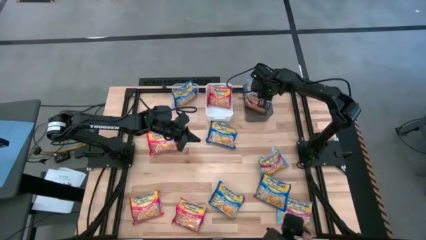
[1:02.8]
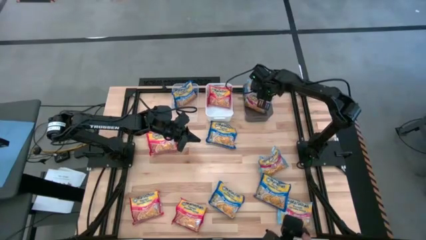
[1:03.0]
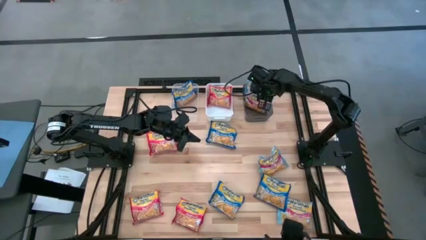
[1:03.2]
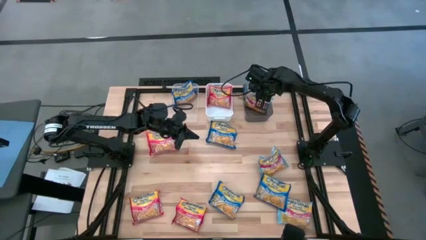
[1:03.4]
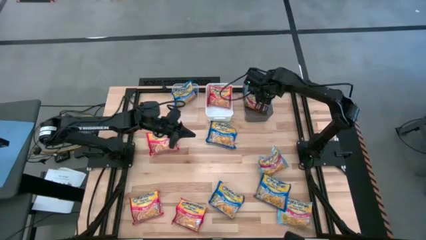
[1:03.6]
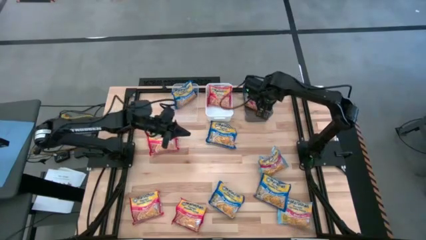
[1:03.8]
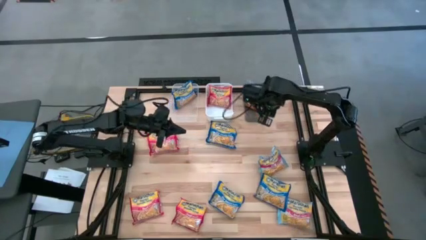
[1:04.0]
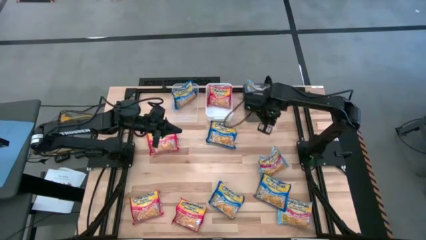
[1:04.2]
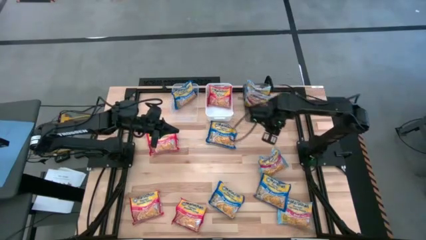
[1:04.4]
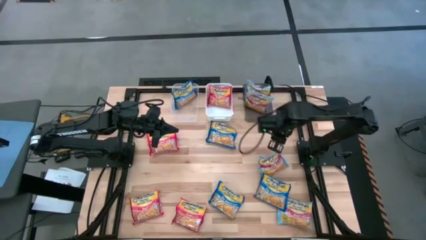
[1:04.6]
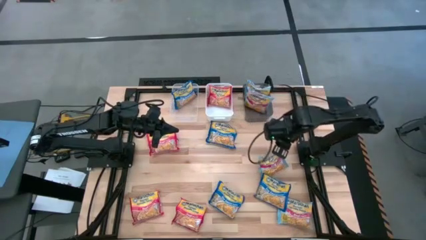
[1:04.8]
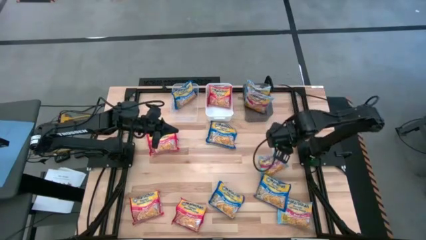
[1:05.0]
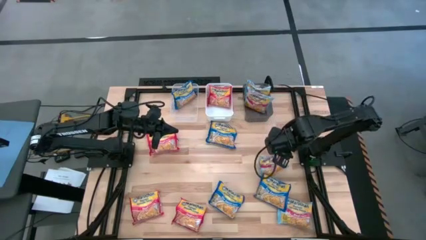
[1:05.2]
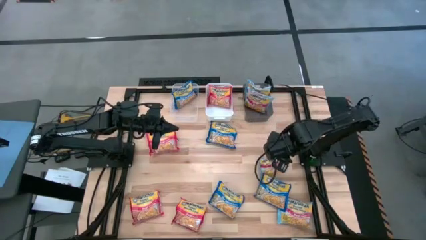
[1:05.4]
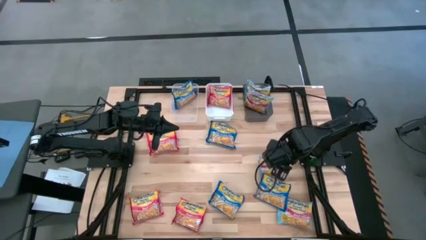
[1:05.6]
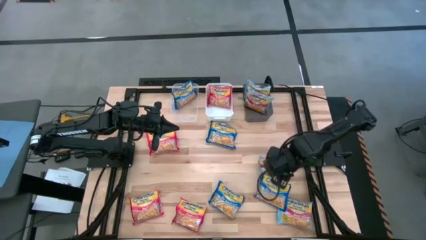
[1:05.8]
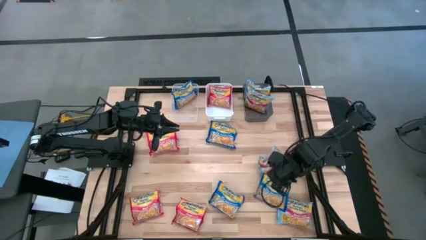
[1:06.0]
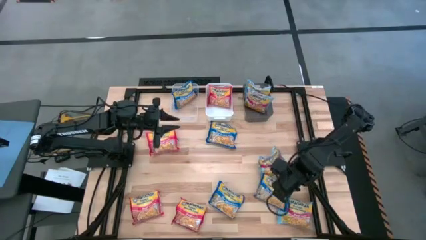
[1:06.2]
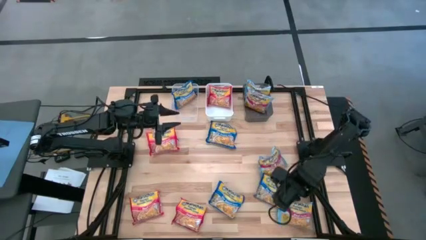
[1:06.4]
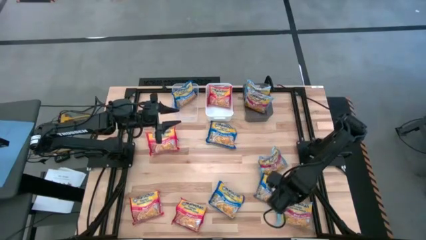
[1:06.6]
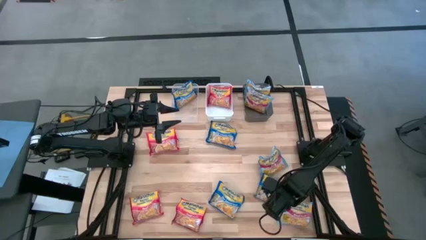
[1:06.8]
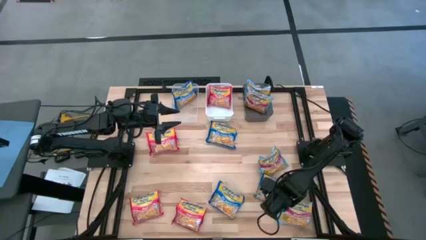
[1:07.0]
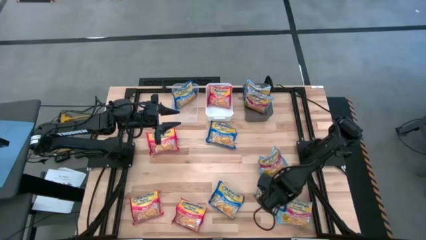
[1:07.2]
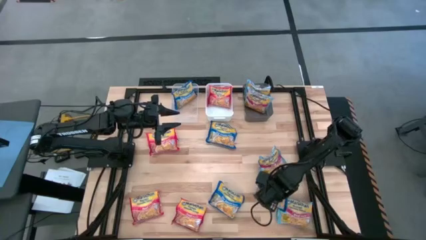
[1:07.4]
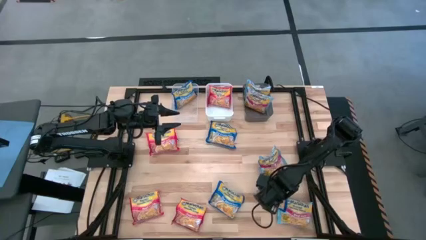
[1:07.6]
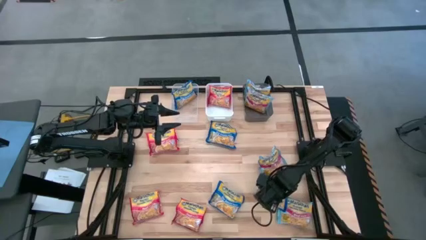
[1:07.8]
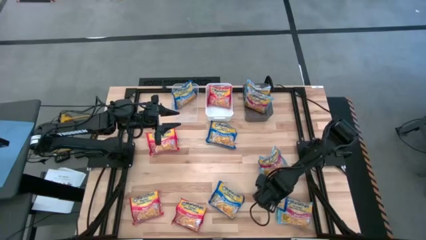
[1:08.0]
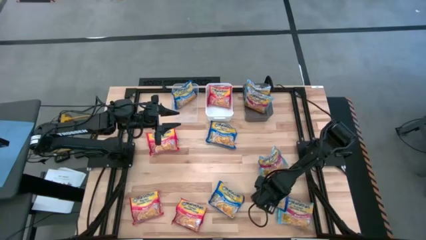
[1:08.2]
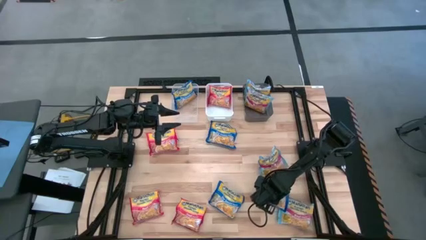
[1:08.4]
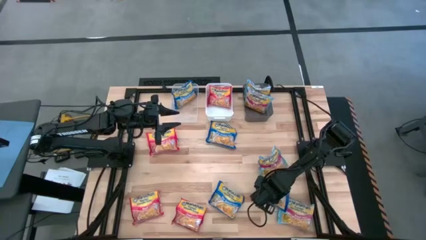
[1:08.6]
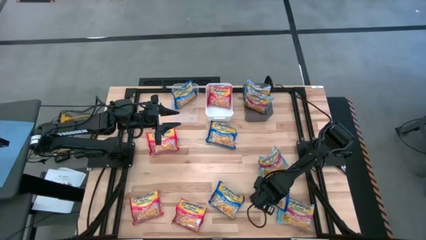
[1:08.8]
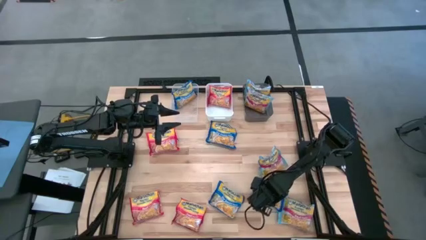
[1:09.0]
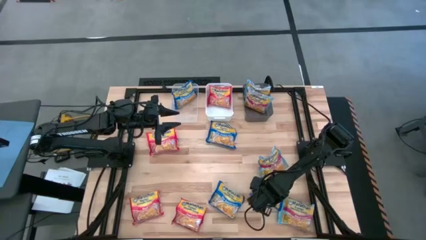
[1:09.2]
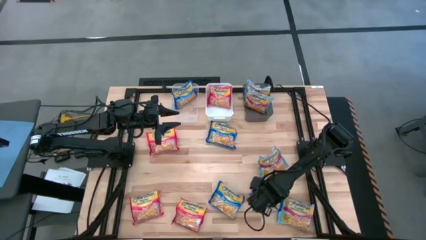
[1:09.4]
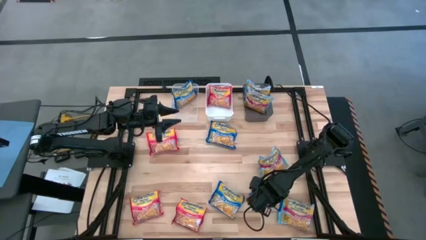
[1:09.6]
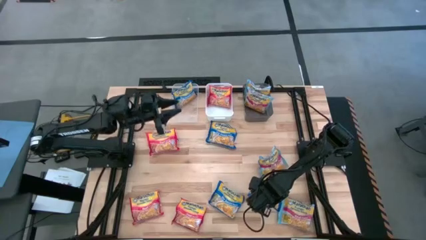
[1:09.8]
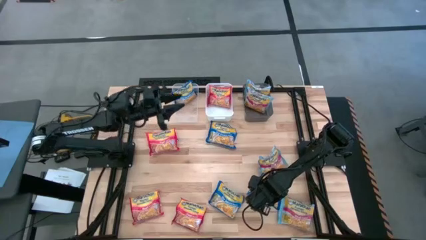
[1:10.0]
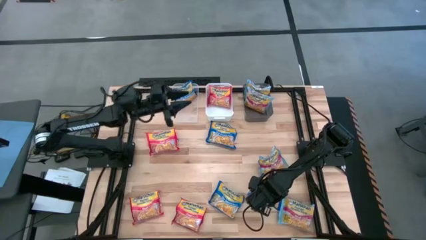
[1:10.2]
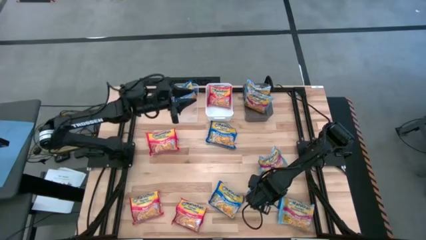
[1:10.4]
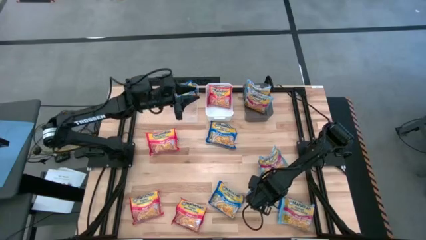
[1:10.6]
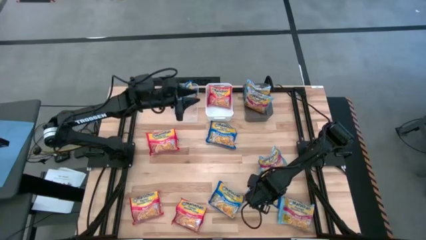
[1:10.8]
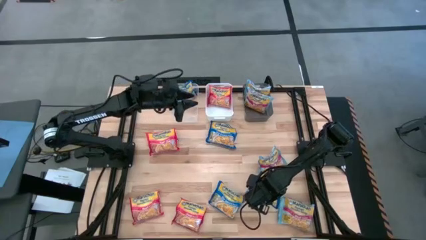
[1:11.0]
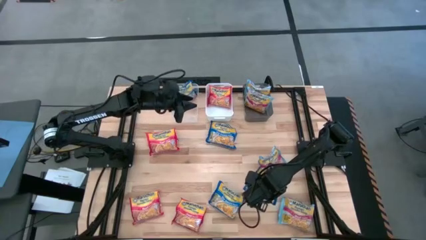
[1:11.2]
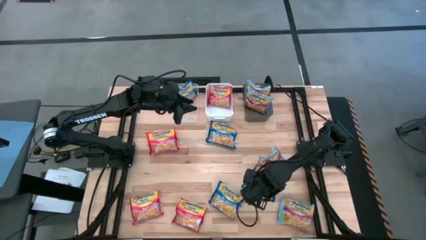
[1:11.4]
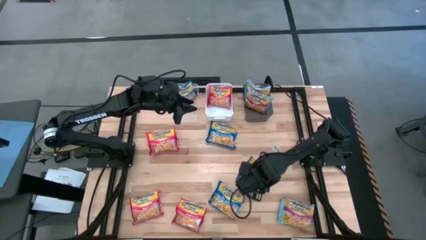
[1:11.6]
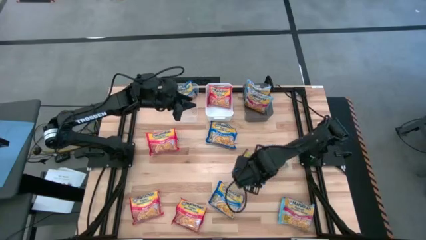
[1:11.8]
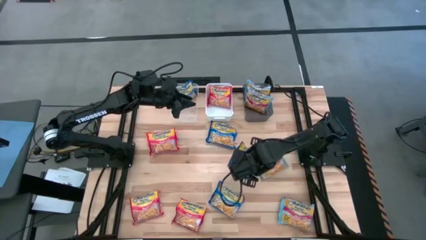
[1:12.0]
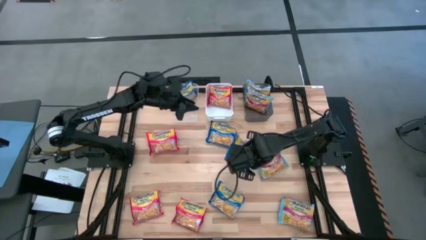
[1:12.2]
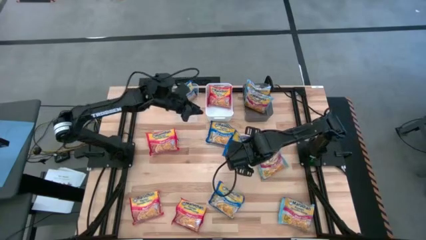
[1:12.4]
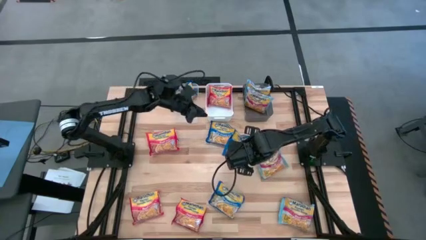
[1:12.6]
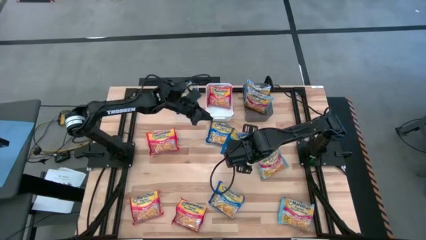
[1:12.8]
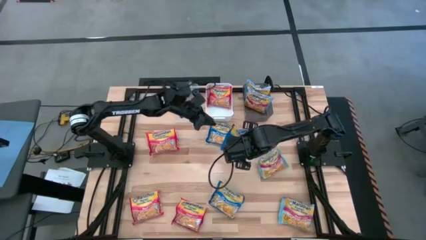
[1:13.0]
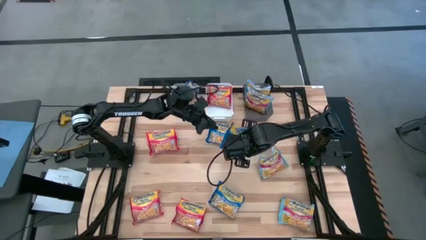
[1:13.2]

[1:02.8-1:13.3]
Task: Sort Maruchan noodles
Put the blue noodle pack into the transparent bin

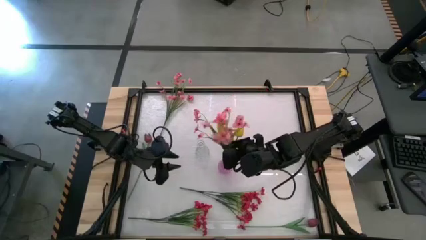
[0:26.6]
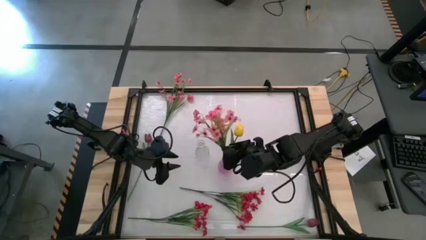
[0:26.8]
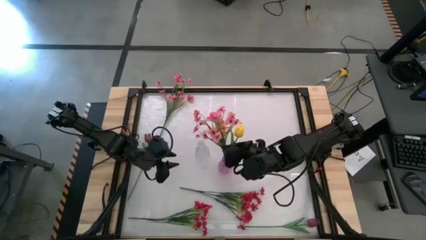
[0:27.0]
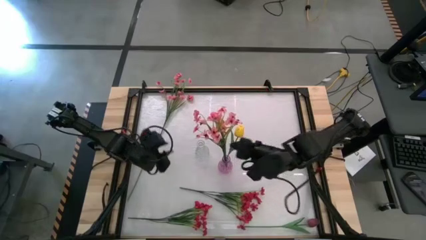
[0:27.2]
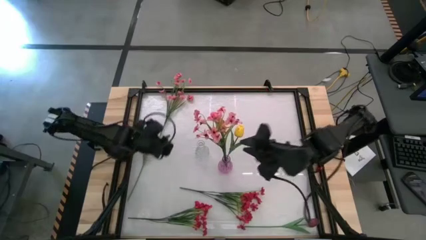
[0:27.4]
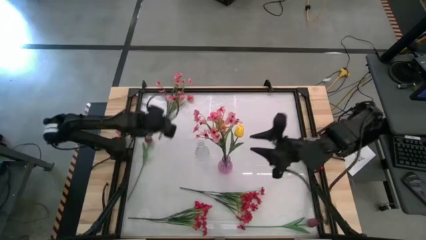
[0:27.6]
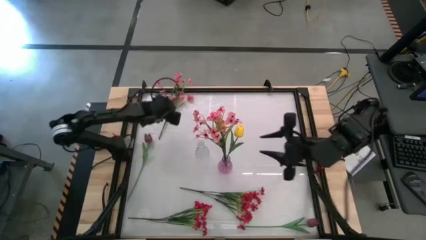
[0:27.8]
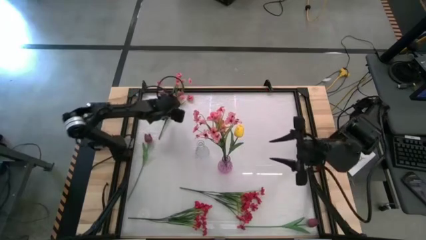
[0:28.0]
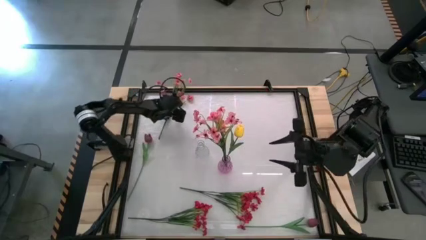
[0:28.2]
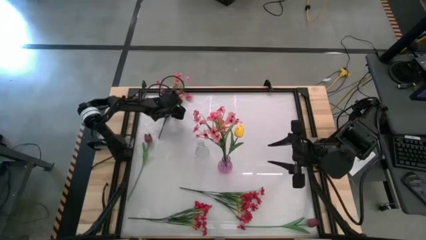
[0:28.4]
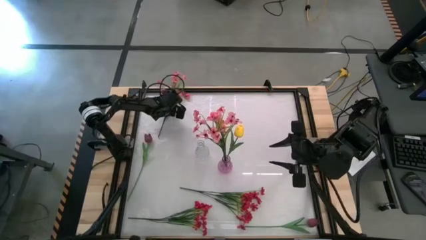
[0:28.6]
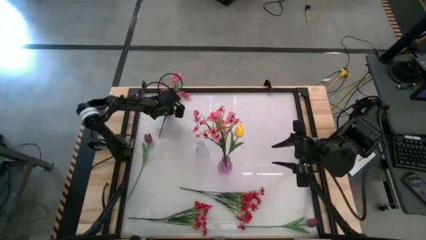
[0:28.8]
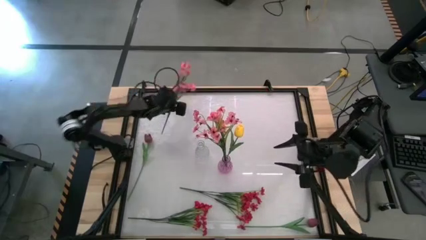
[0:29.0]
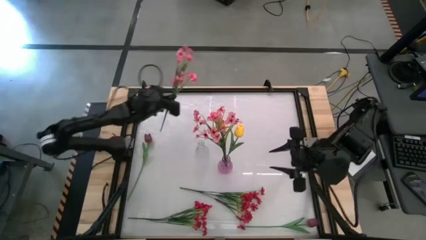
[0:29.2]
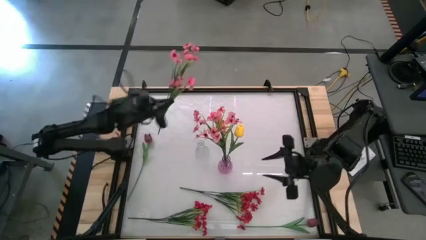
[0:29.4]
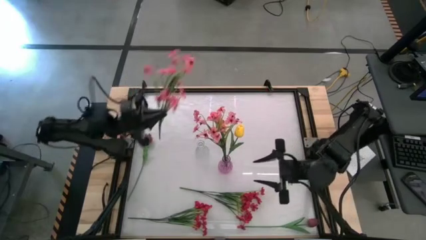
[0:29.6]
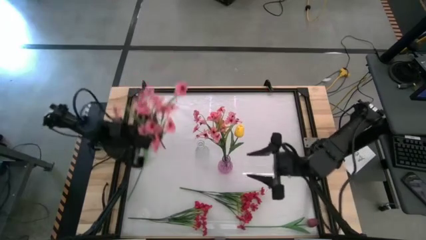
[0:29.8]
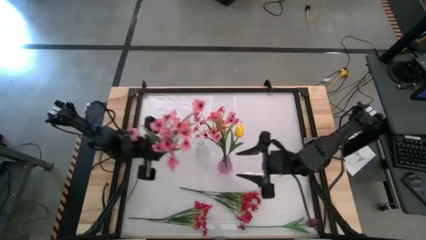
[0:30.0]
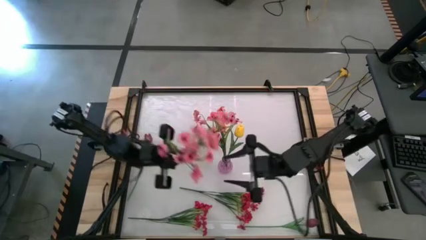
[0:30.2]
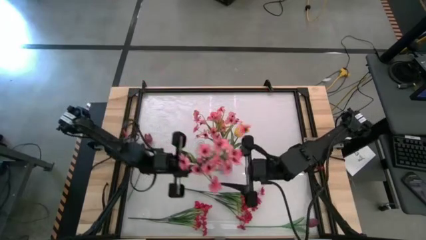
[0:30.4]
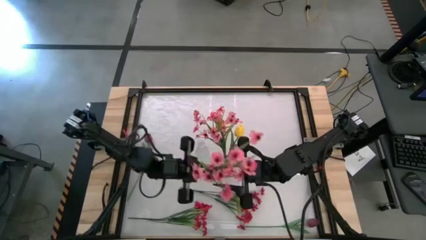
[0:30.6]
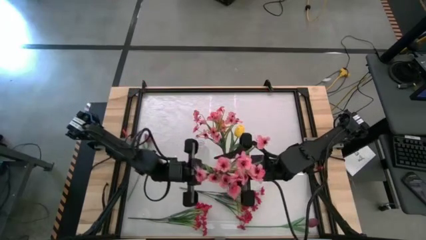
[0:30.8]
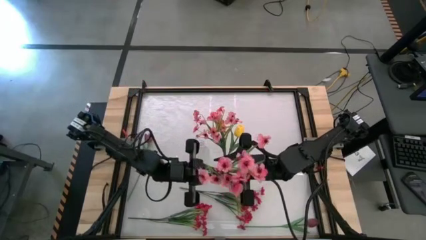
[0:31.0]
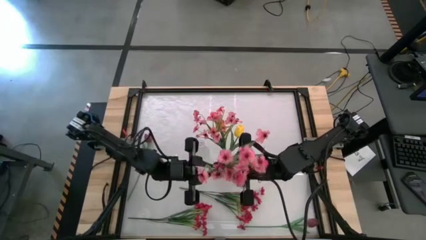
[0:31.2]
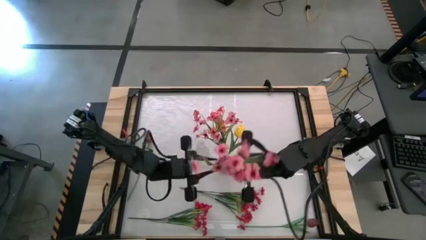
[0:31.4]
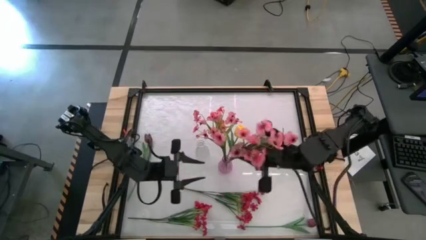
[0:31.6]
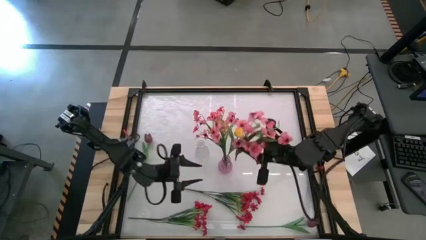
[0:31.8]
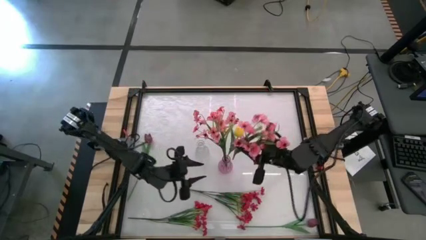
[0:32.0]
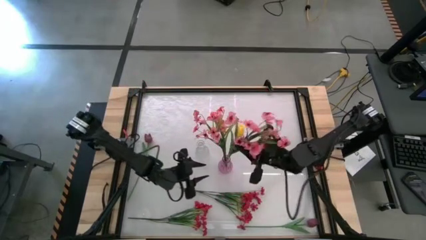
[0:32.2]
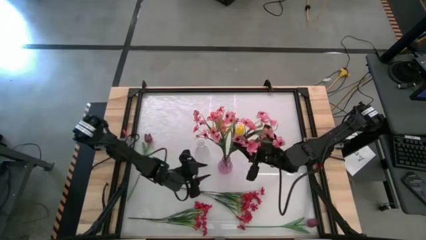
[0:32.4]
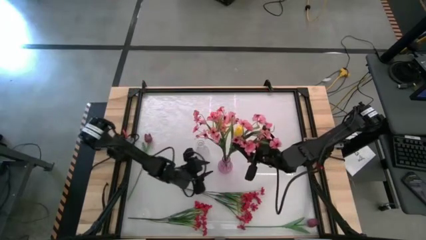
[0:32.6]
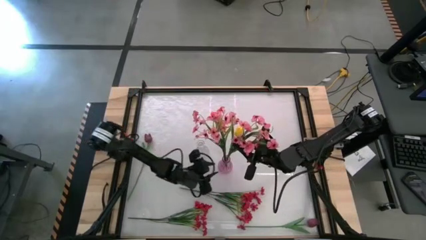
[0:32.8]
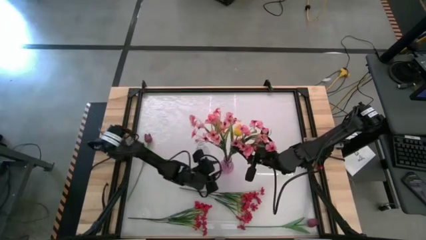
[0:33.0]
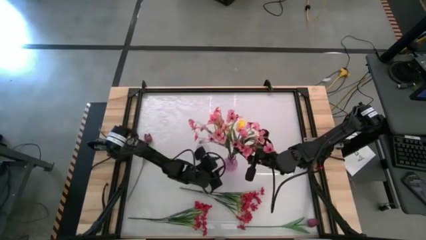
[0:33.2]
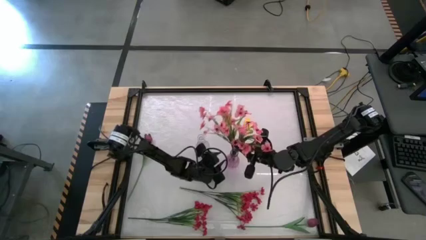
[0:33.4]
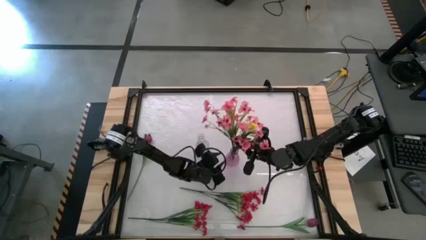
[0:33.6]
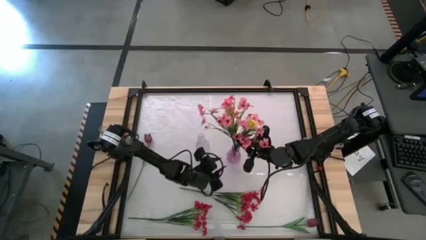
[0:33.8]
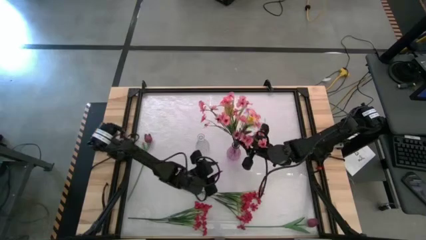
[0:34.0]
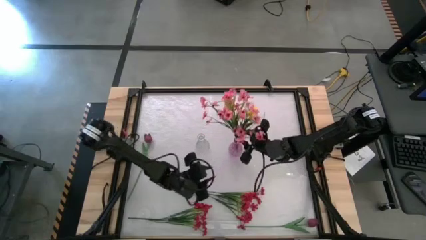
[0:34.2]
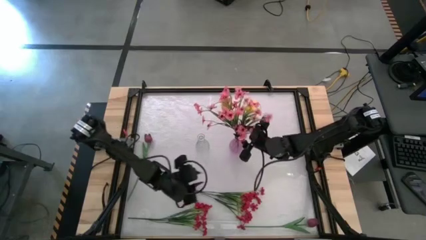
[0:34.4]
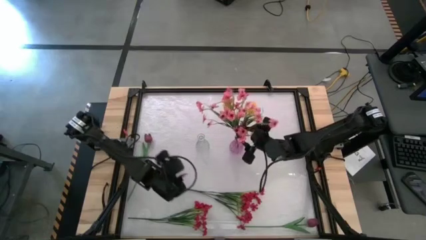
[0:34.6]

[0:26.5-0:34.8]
Task: Sort flowers into vase by color
Put the pink flowers into the purple vase
